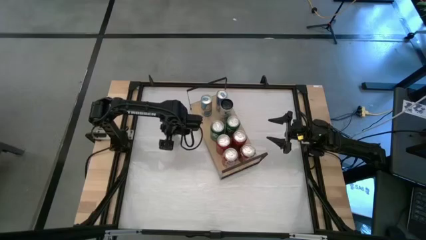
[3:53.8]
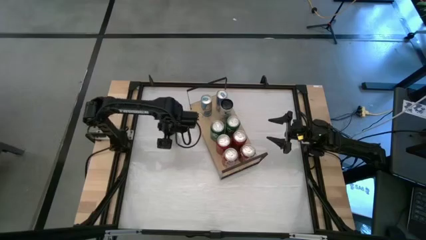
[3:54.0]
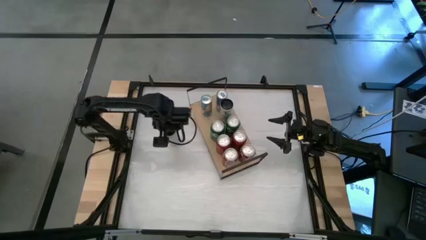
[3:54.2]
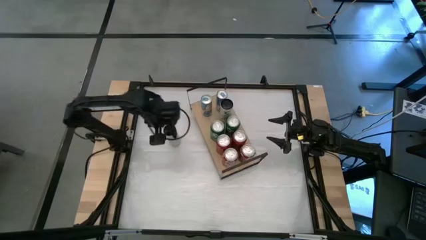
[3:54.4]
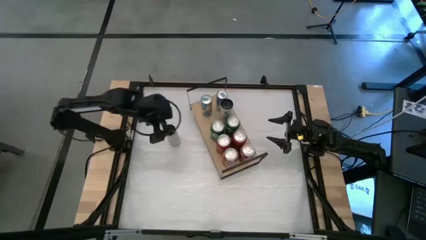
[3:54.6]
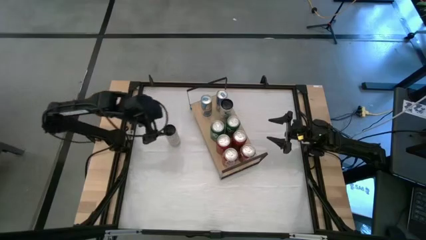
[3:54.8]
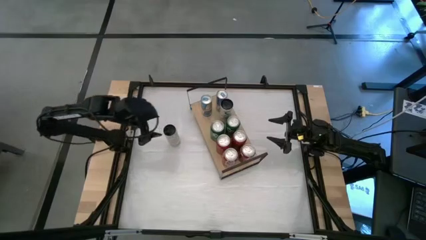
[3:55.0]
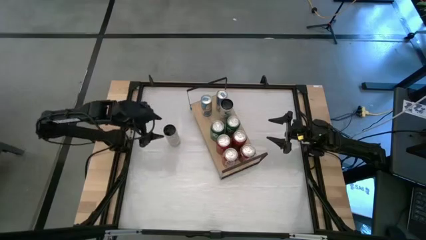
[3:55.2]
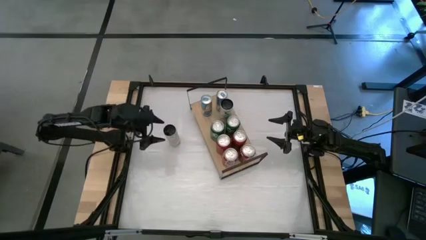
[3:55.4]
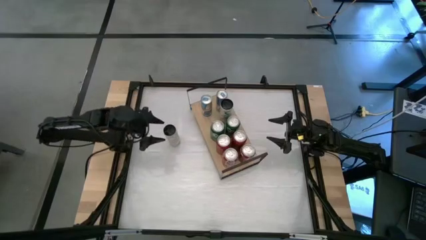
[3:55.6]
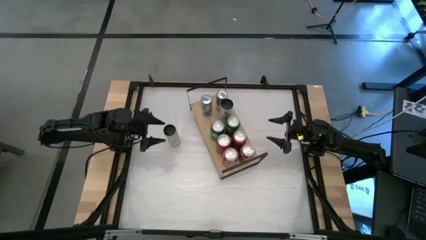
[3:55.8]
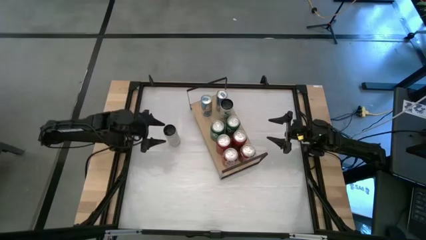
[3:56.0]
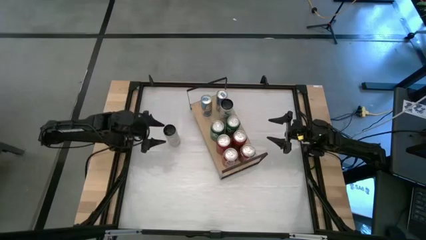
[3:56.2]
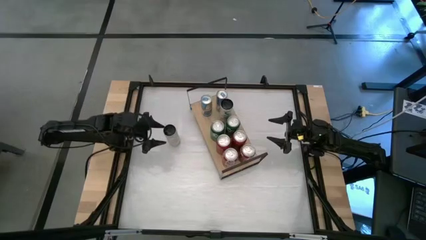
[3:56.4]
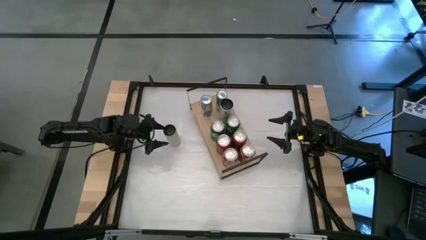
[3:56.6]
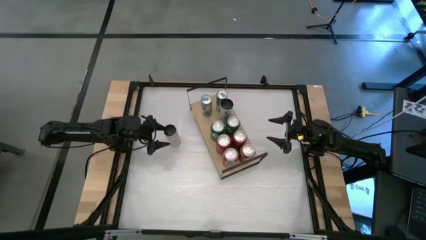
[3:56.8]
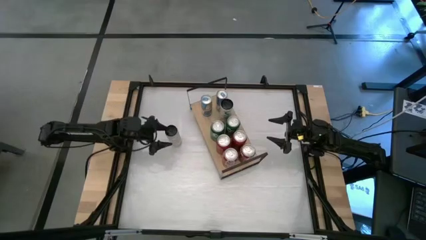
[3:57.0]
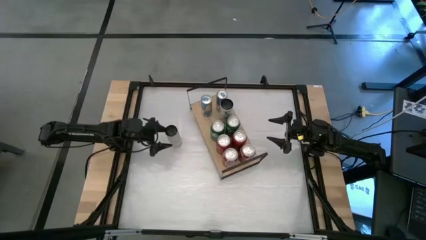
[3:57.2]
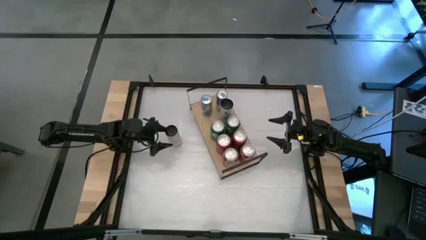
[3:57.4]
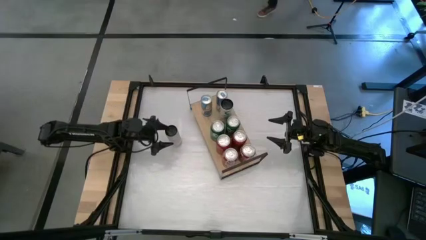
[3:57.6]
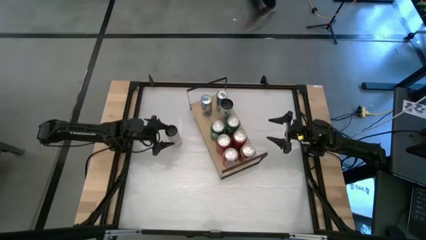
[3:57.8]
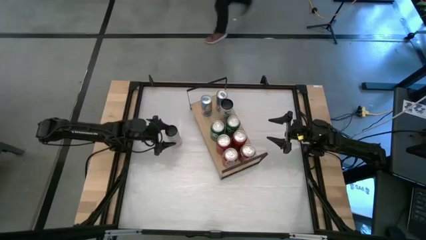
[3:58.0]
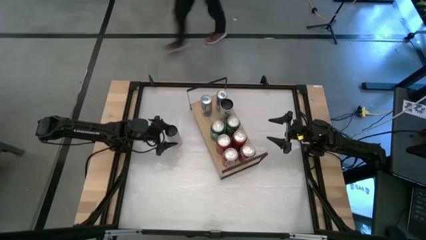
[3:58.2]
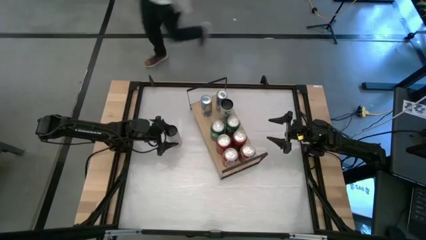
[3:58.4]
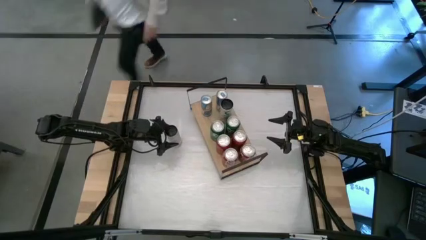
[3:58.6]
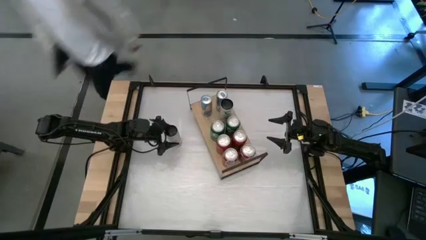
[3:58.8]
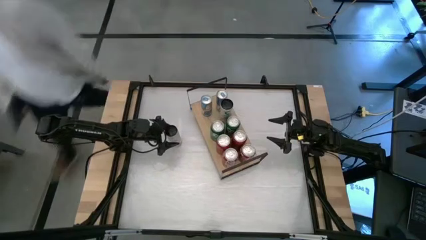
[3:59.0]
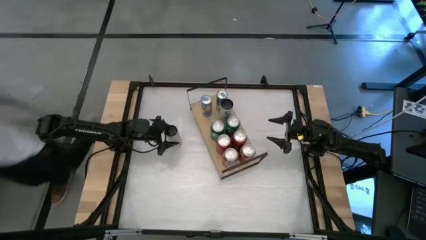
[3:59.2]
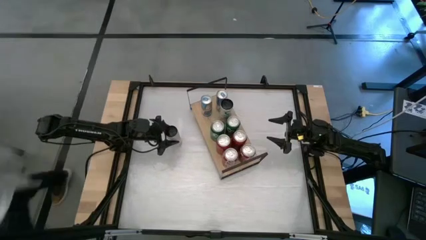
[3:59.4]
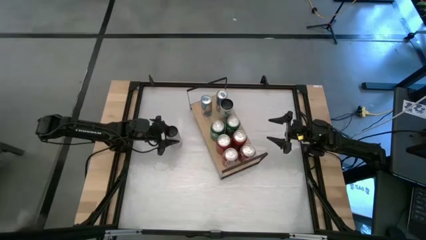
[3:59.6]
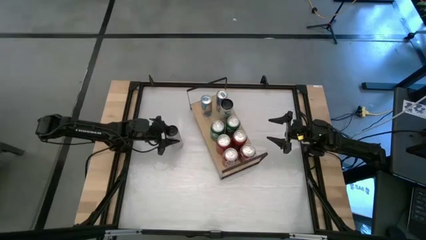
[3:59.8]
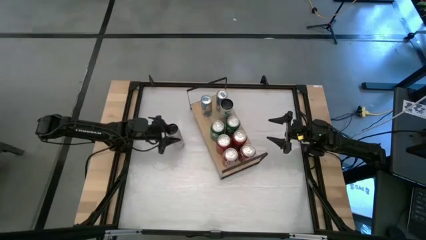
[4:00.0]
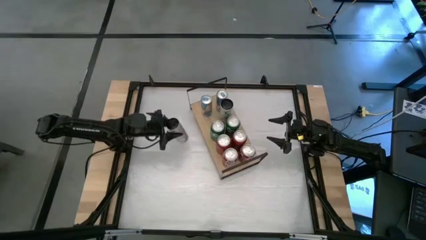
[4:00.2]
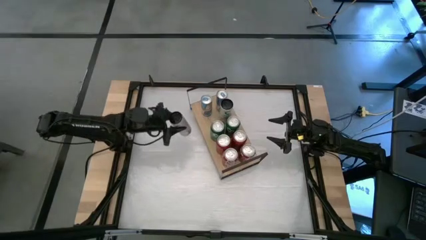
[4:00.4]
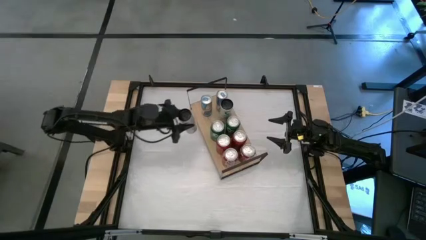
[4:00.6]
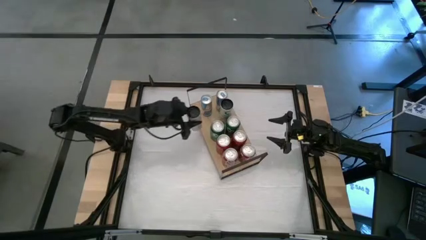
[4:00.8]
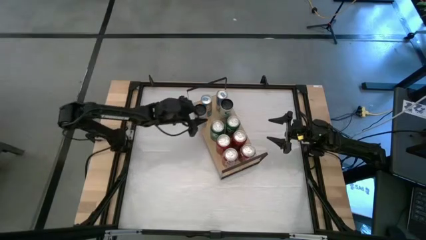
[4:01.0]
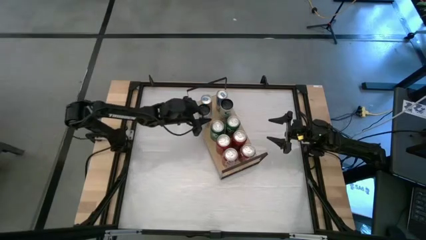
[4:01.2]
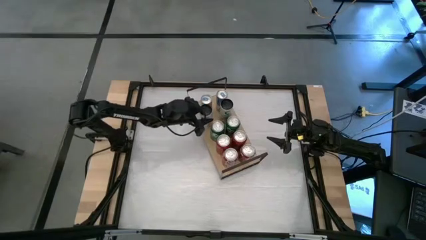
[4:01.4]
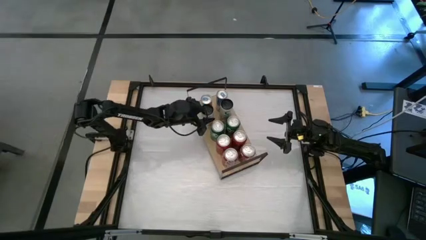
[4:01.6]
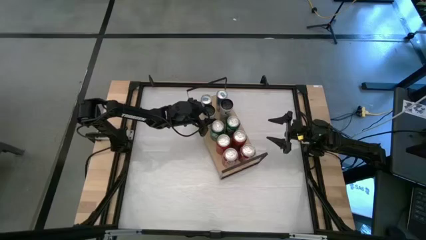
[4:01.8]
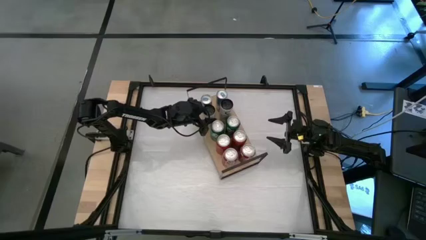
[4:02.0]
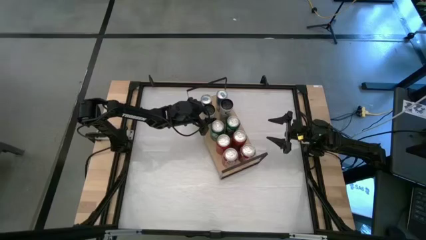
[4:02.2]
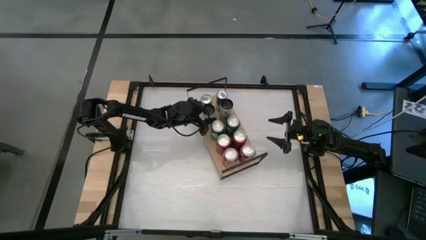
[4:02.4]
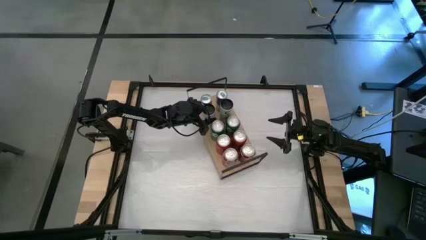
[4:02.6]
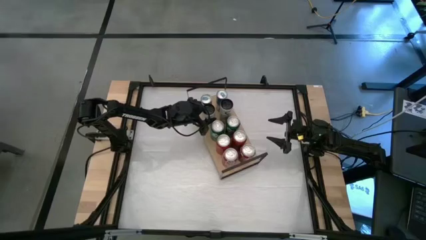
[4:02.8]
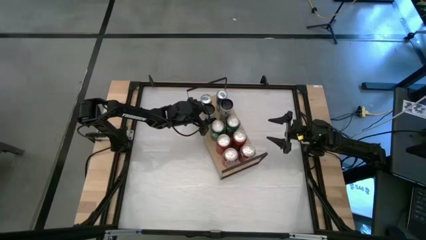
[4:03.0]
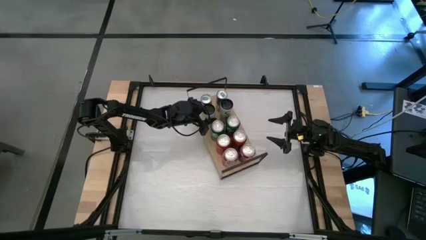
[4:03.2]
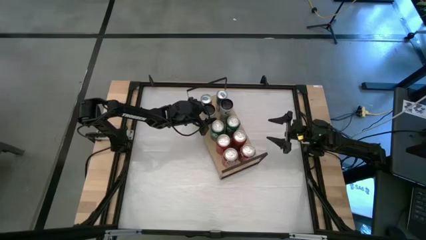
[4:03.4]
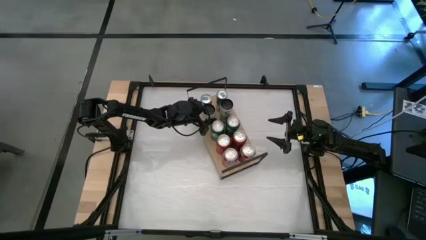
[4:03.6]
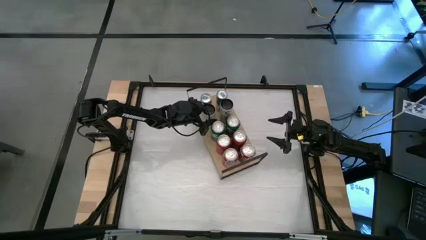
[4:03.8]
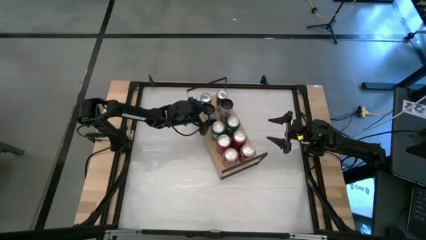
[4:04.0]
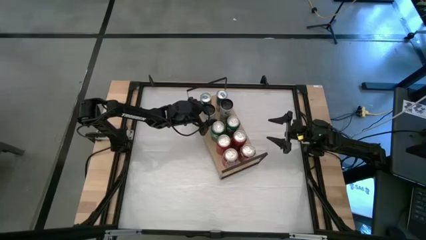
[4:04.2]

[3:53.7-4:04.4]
Task: Place canned beverage on shelf
Put the white-yellow soda can on the shelf aligned with the other white-yellow soda can

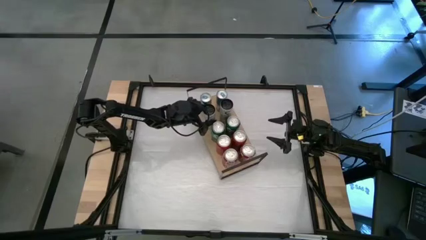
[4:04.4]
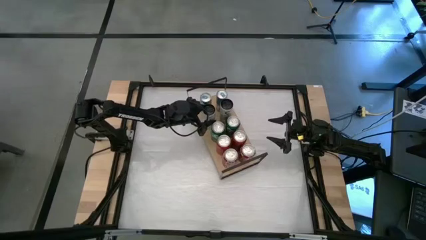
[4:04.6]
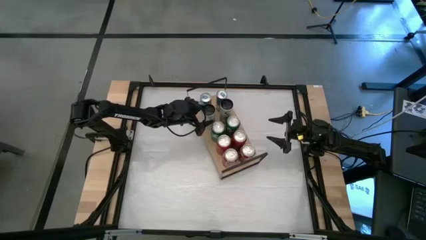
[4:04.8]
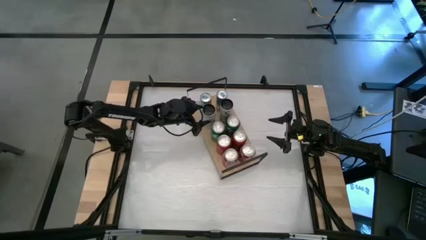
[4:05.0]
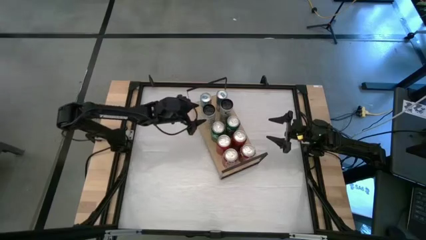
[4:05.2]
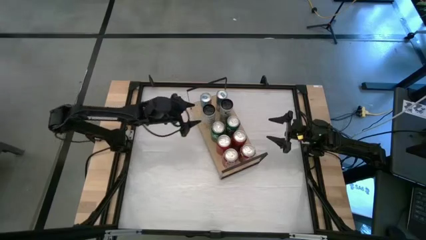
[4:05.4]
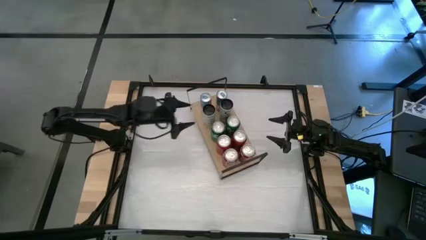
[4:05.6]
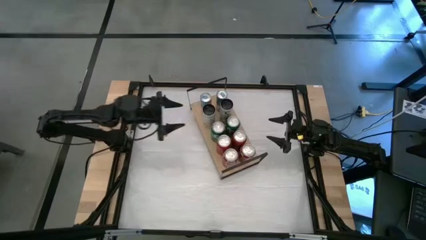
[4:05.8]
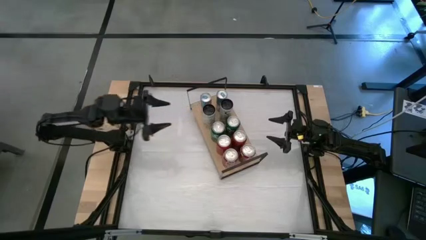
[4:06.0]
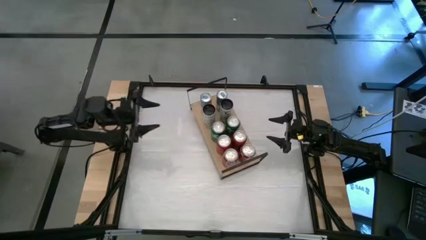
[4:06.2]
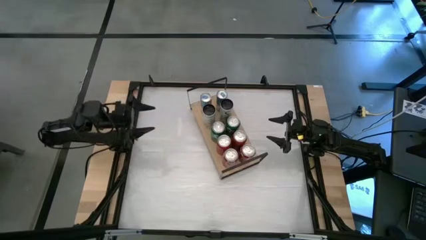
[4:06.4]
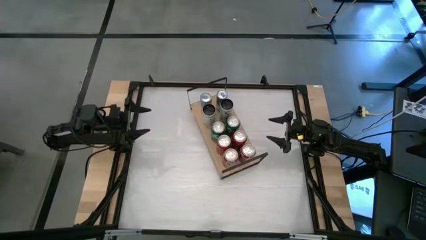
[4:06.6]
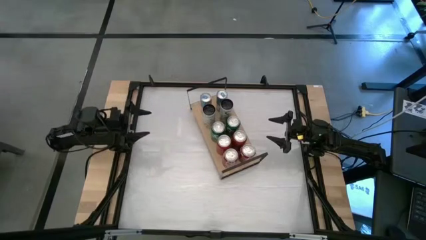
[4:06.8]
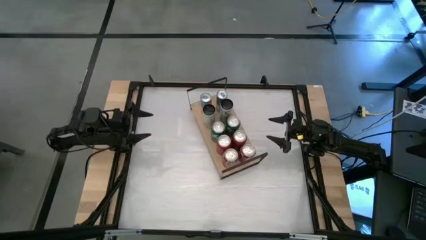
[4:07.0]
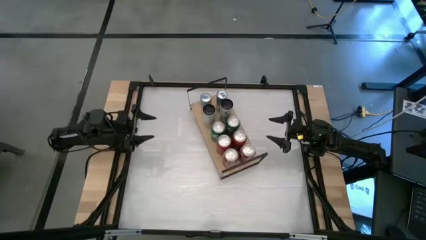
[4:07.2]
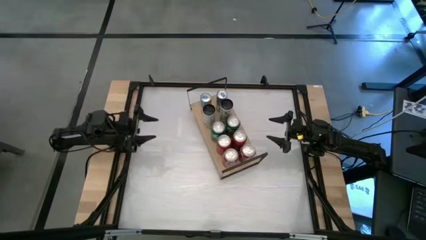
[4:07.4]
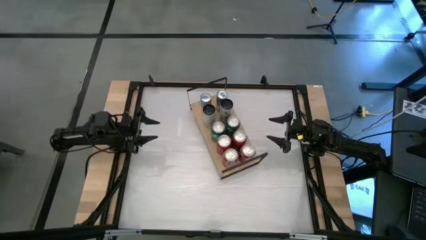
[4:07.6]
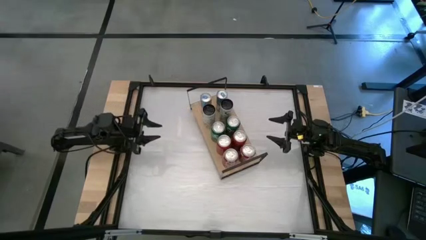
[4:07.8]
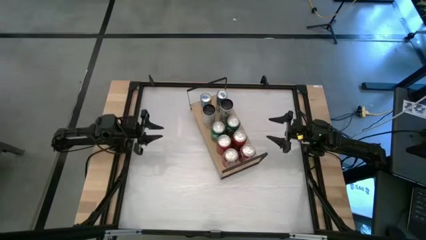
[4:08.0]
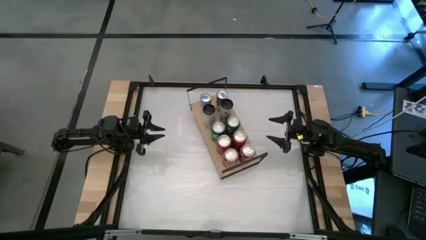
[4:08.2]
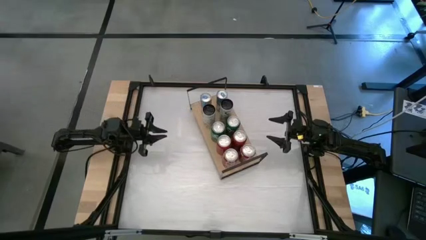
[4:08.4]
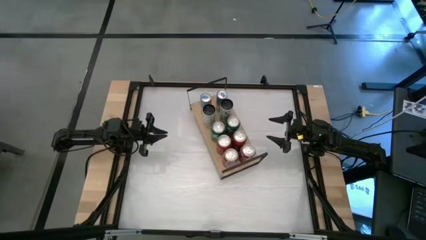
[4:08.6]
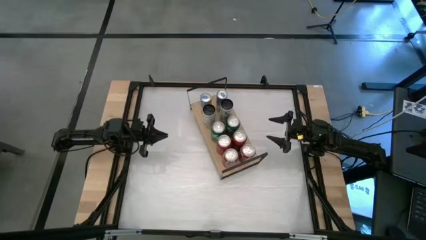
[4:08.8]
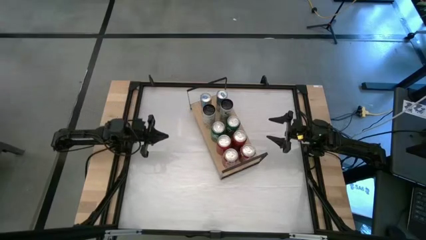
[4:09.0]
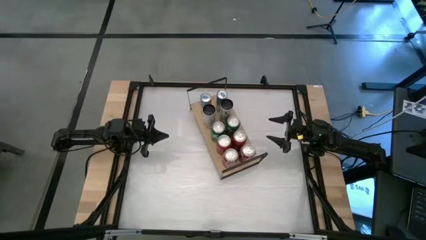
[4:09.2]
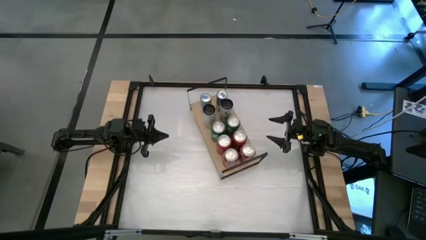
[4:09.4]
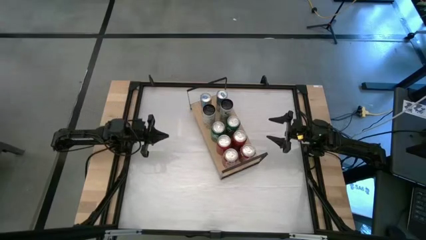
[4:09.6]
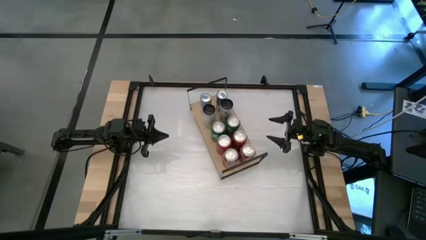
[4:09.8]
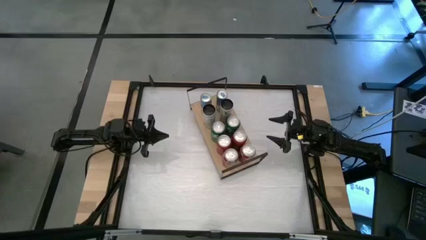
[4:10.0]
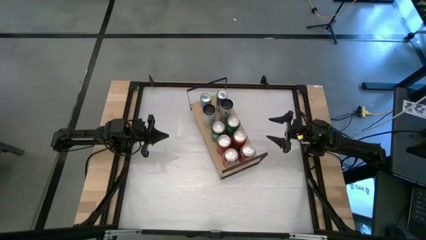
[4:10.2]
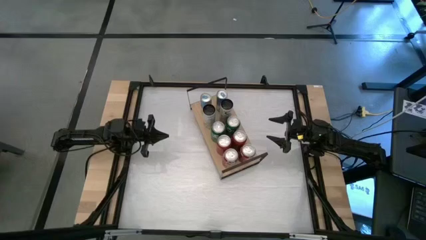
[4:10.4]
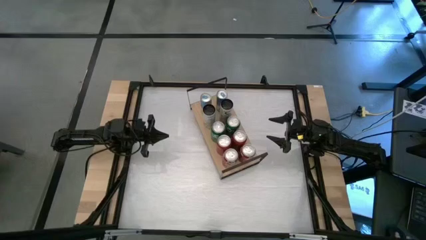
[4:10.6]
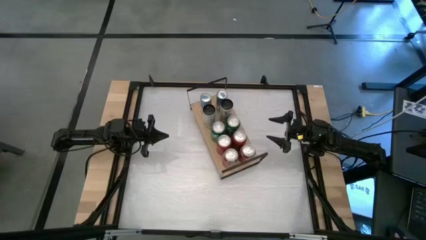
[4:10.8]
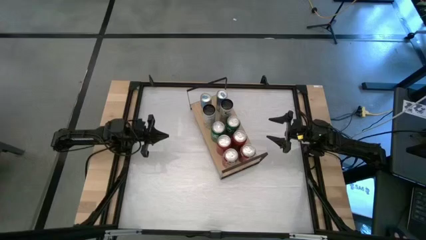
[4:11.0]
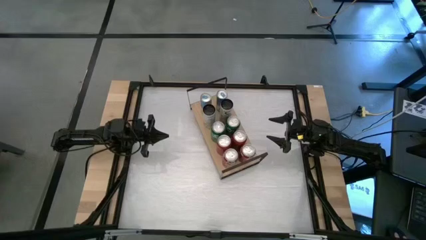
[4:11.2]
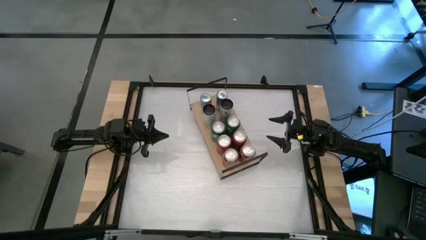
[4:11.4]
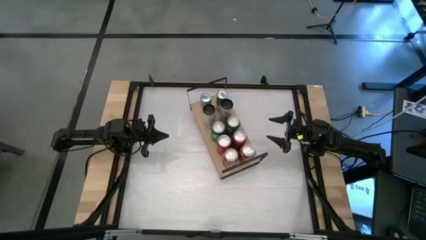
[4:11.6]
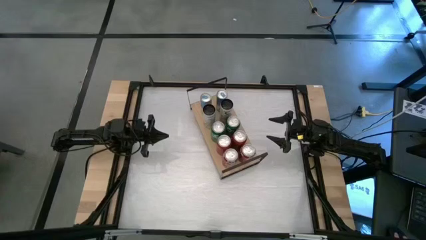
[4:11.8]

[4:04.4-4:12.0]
Return to Home Position
